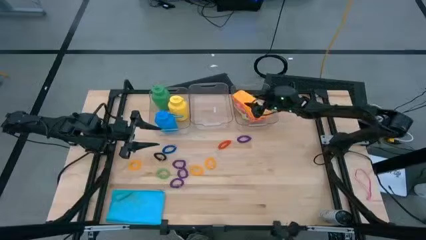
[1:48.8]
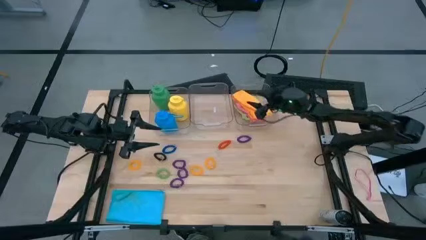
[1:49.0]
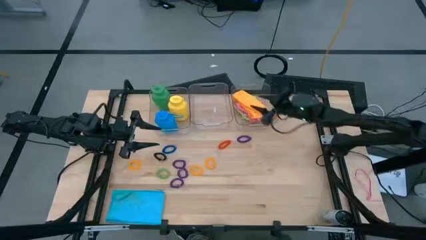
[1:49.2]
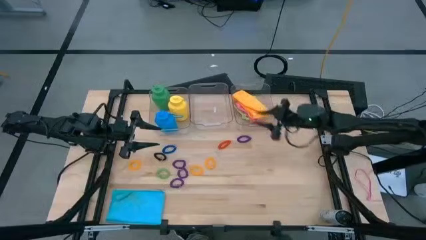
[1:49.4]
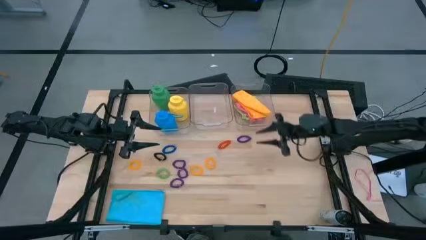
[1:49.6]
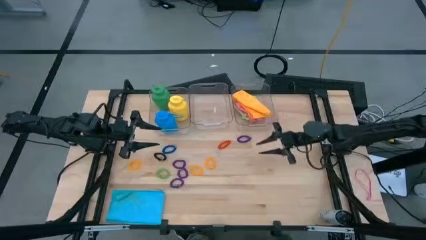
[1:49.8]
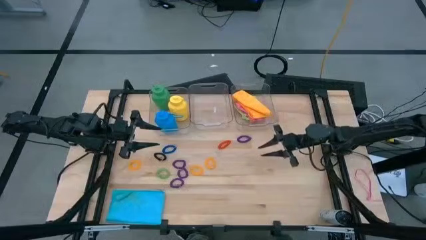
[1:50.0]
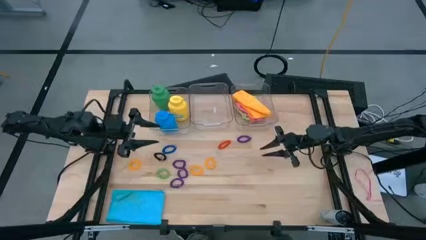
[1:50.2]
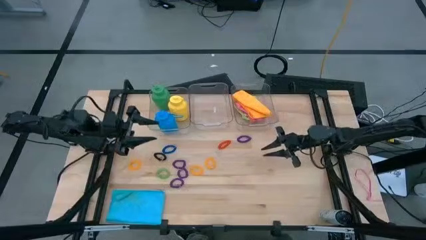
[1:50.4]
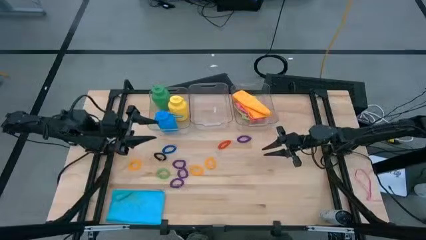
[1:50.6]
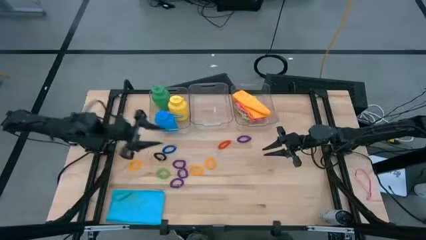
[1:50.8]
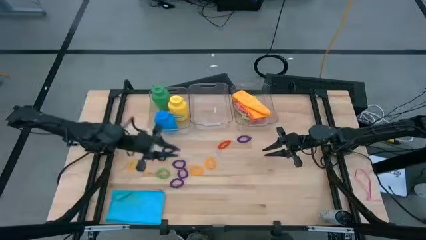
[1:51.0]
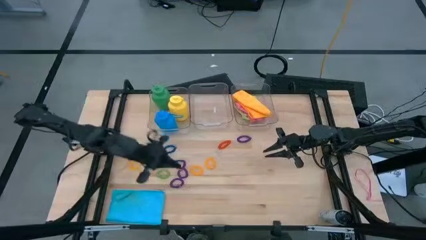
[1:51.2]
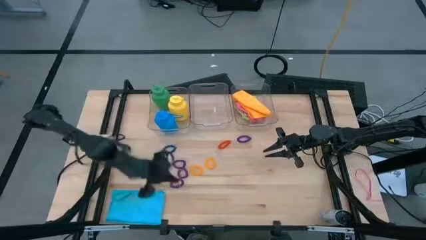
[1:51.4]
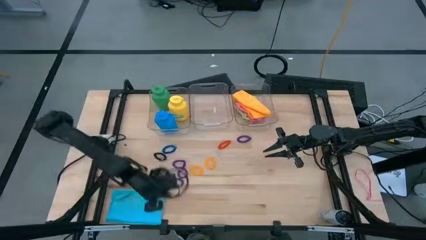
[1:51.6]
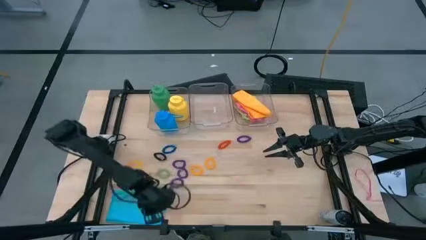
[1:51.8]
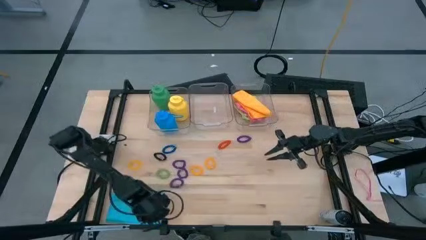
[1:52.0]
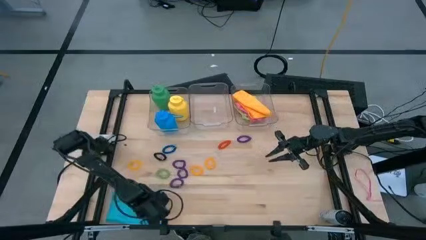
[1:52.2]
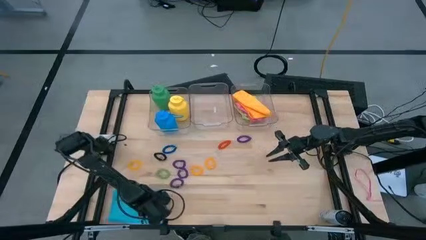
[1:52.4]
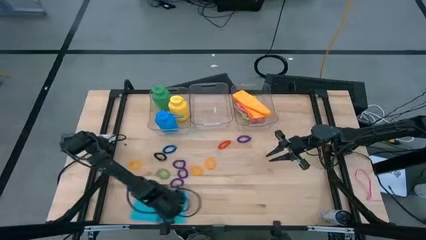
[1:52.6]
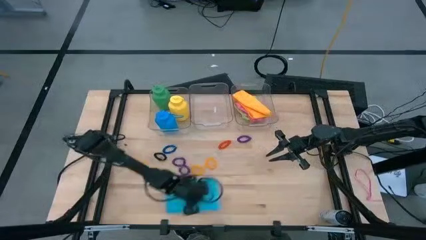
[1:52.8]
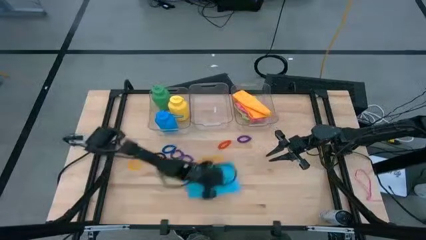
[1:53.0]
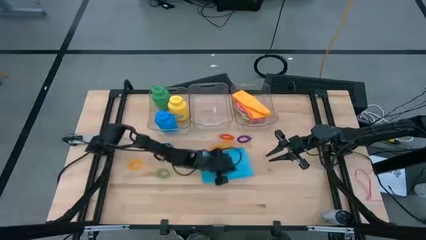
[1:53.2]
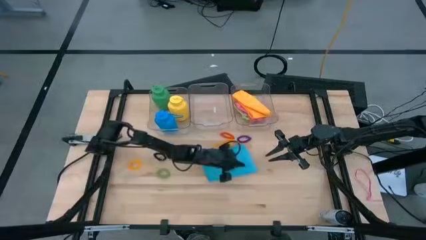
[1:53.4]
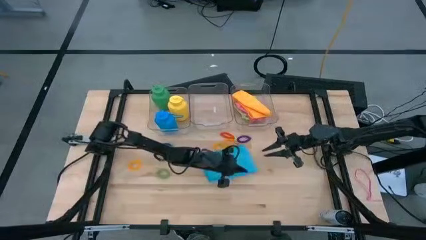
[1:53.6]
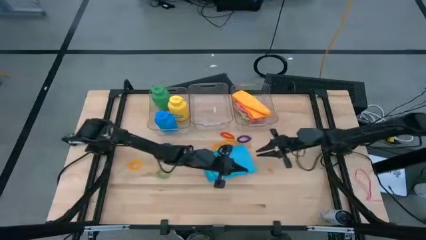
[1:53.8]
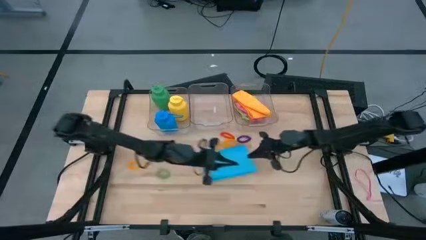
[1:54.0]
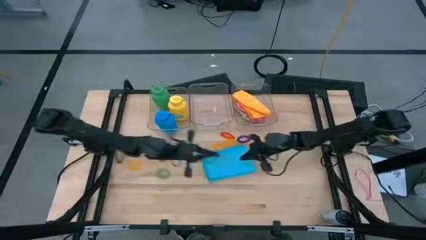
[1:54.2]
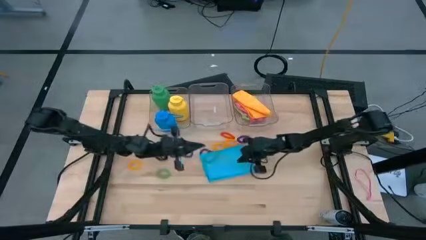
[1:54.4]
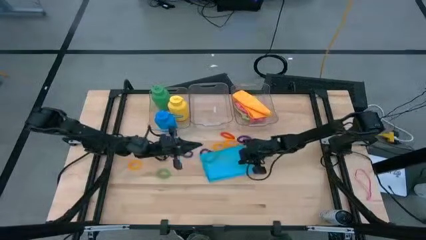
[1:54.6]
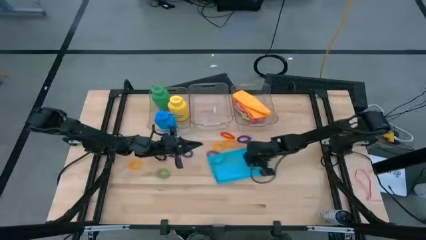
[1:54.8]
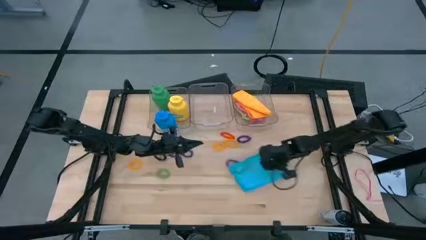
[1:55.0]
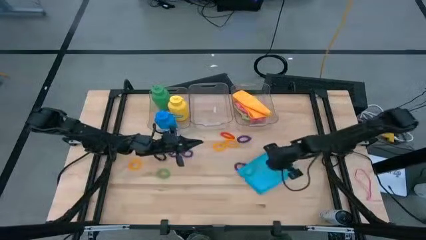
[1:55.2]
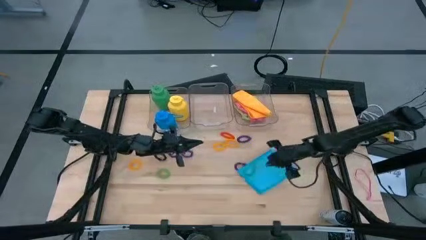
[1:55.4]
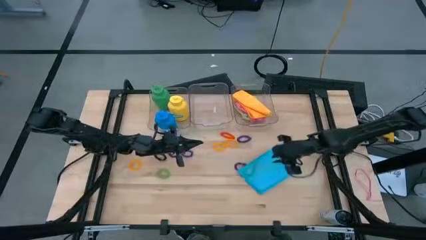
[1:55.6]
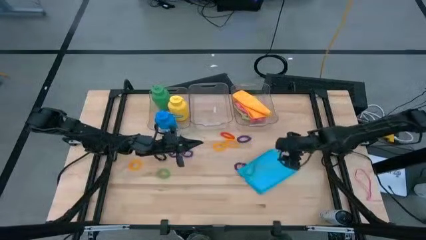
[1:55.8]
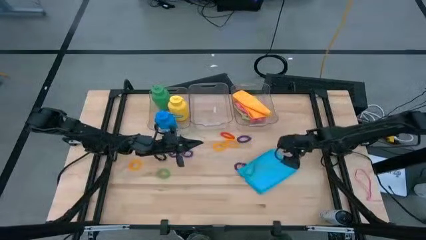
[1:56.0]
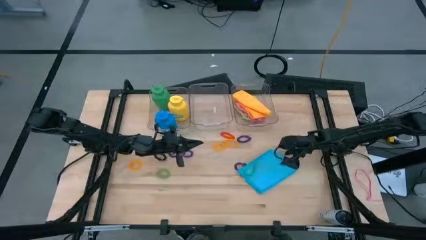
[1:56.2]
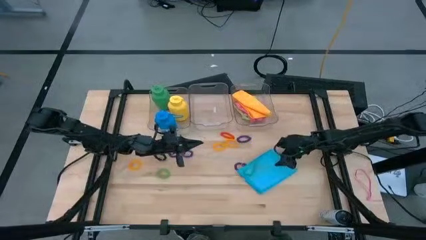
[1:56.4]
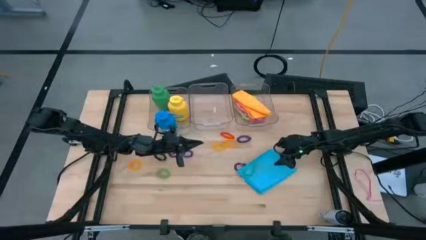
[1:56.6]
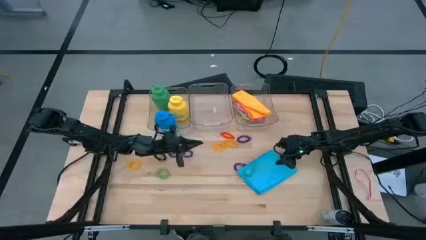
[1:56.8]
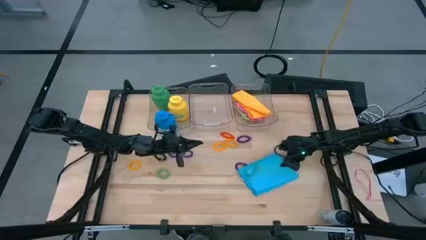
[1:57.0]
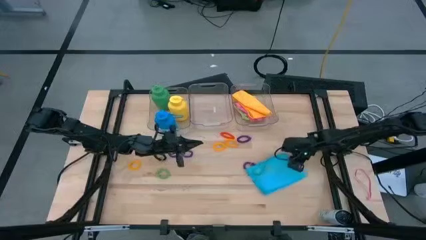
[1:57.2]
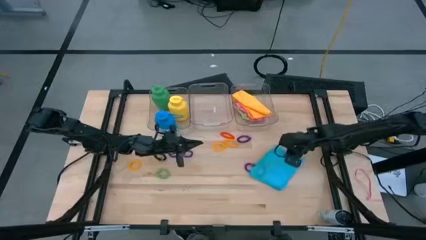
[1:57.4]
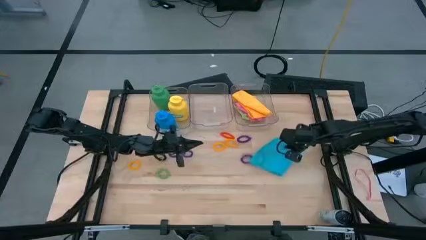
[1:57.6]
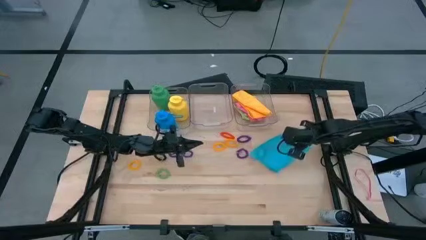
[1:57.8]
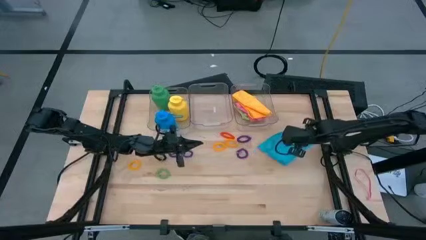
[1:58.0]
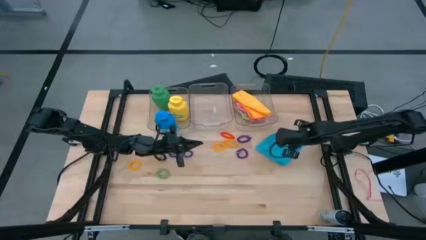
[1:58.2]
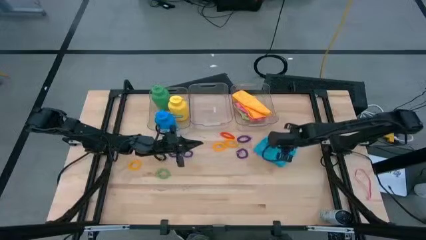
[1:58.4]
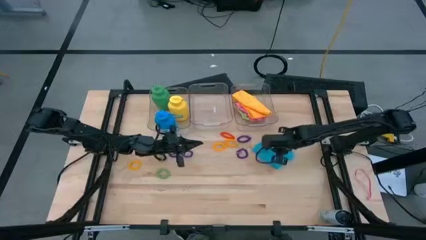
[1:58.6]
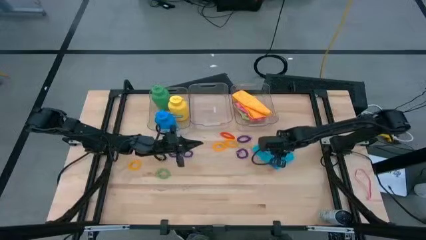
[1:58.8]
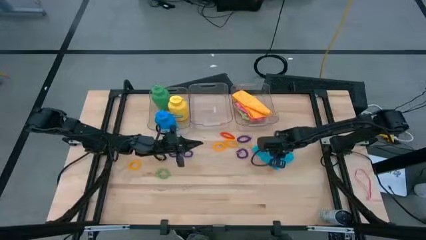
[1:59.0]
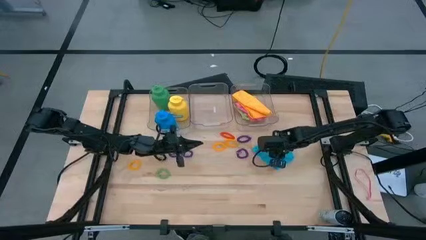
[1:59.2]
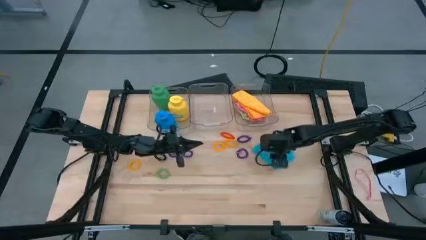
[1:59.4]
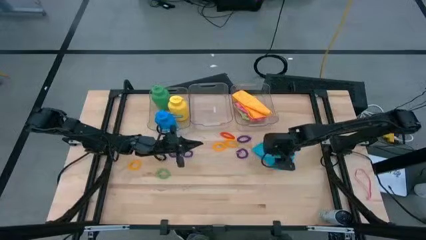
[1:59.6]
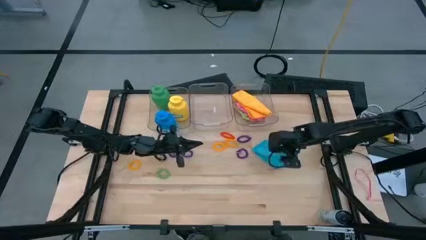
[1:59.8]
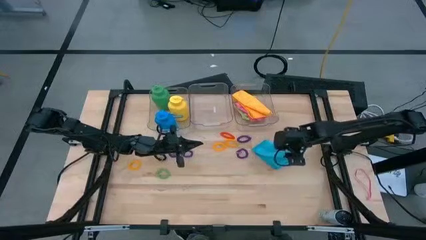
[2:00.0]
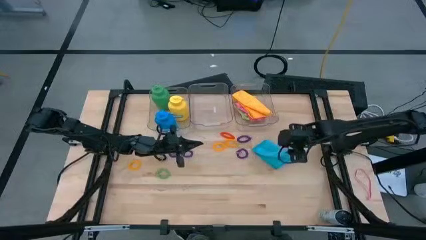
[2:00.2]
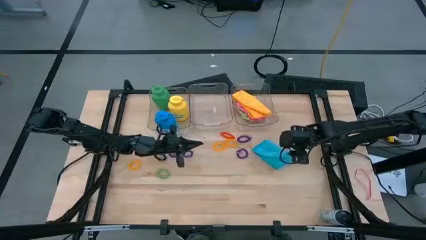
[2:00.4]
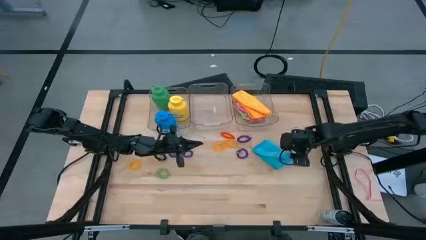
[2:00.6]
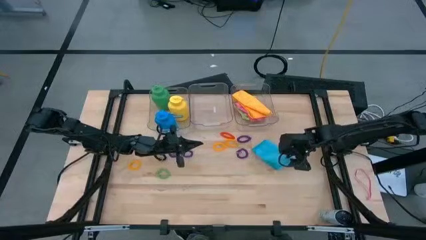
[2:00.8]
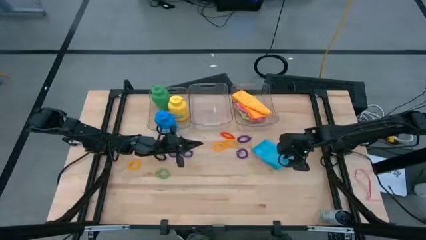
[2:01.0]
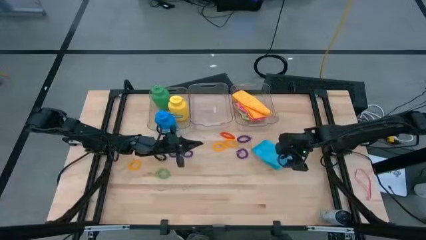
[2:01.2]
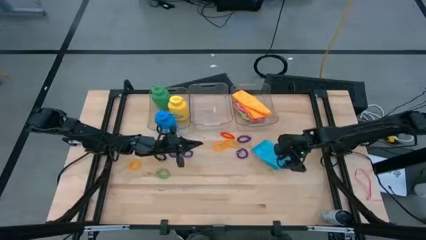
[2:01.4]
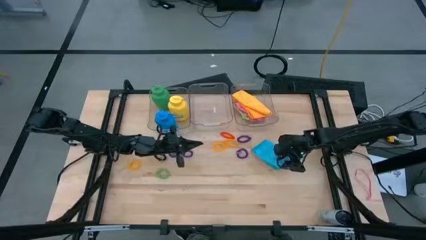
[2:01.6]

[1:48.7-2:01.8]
Task: Pick & Place Sports Items
Fold the blue cloth

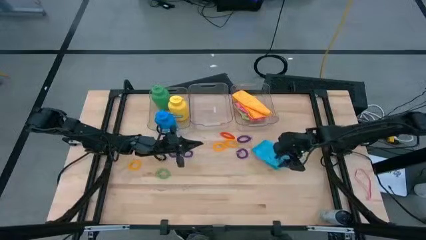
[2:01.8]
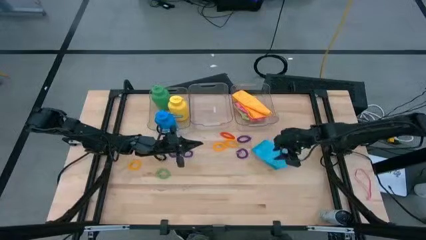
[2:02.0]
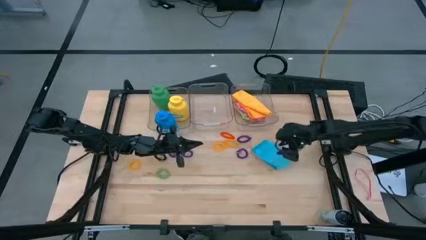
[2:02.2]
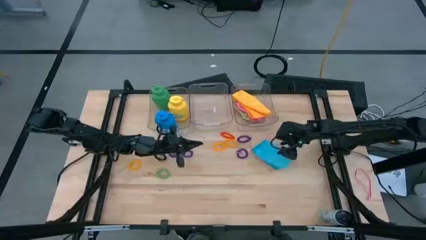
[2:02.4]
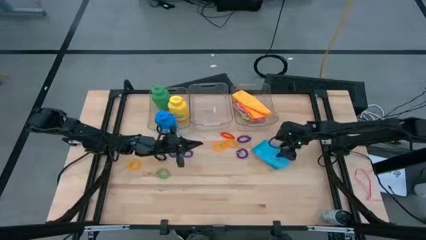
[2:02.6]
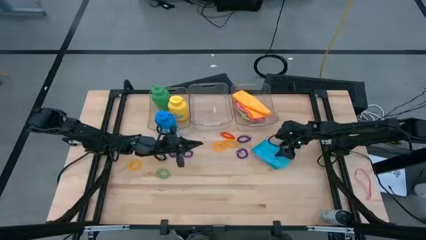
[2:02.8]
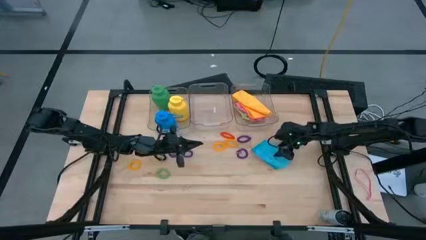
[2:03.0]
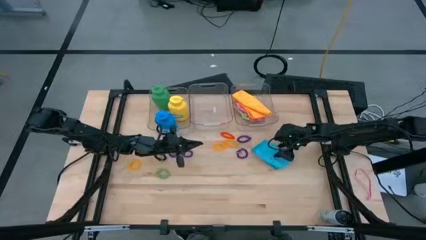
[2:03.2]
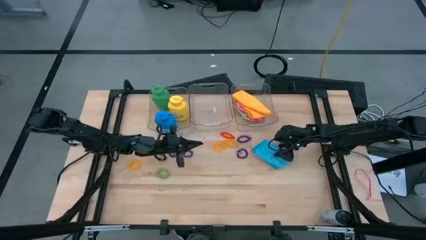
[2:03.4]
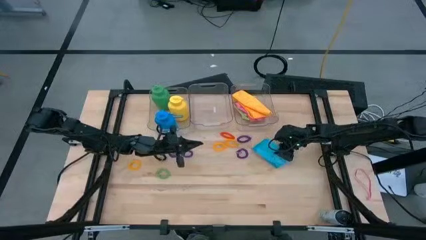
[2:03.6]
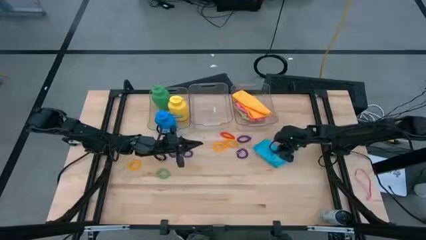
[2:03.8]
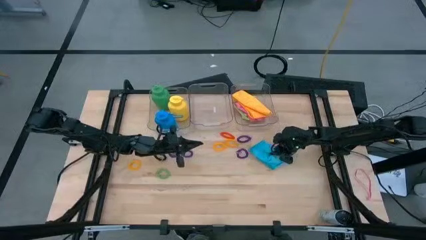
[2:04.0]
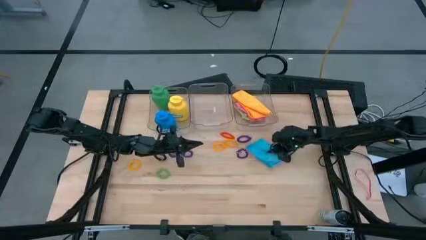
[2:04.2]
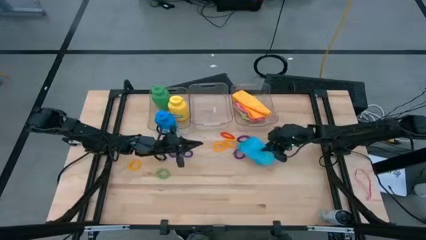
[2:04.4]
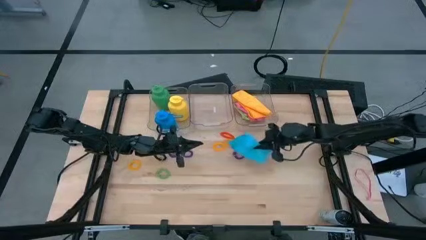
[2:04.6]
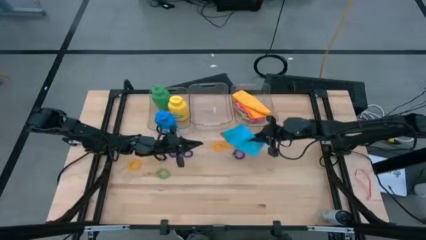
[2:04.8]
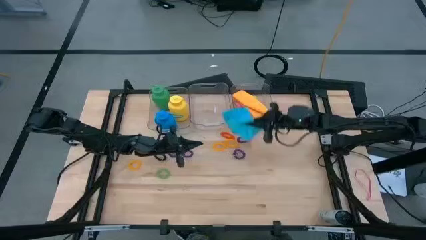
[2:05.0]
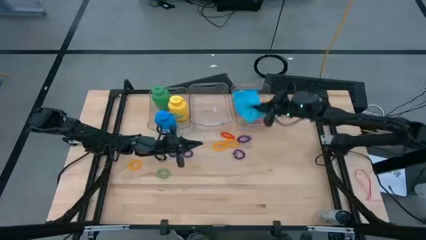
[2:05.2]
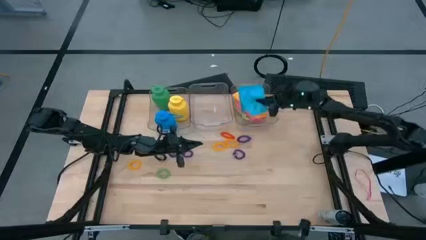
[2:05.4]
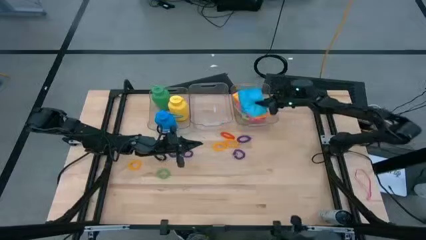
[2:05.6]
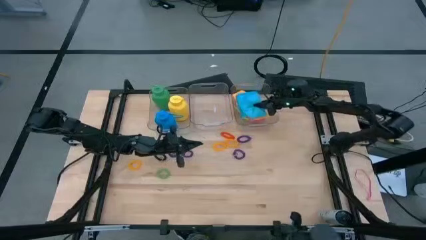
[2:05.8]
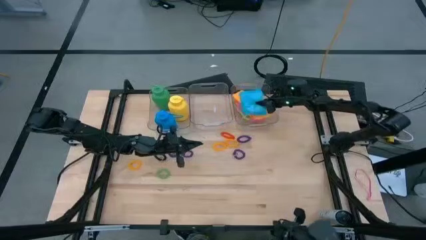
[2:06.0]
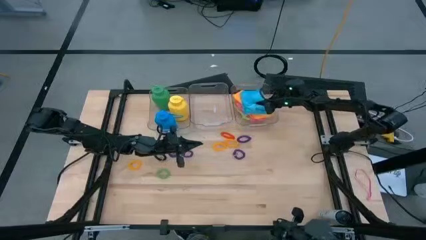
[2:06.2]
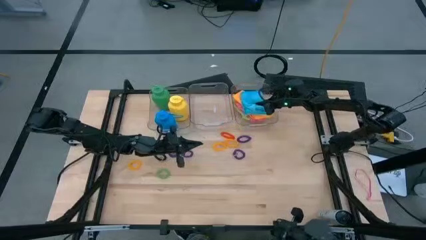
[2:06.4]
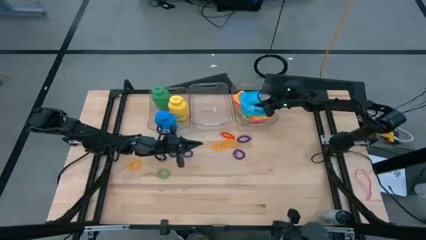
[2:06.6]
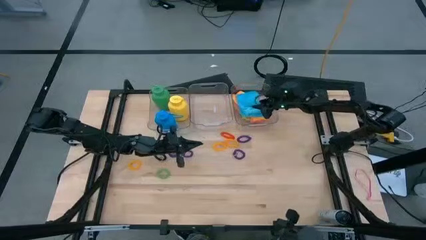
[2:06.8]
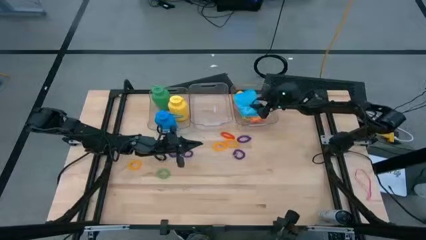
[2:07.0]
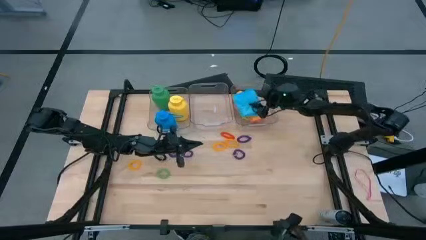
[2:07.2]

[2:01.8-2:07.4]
Put the blue cloth into the right transparent bin
